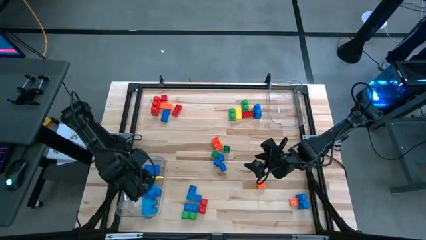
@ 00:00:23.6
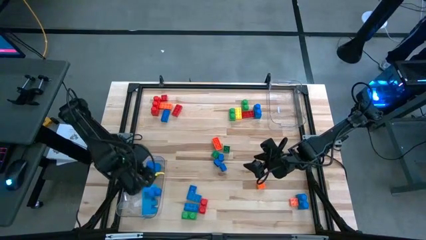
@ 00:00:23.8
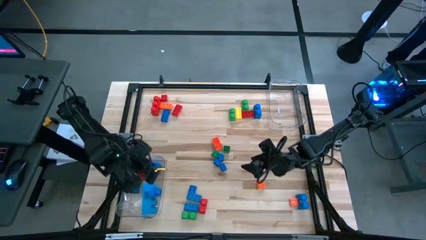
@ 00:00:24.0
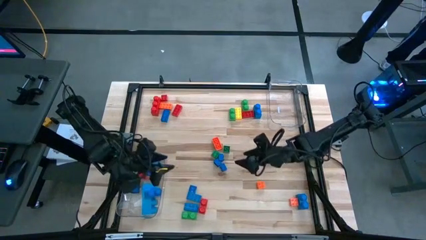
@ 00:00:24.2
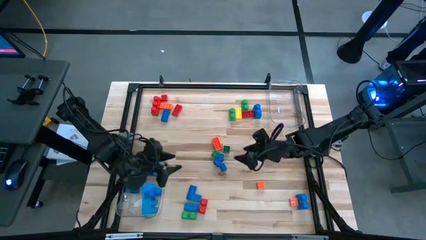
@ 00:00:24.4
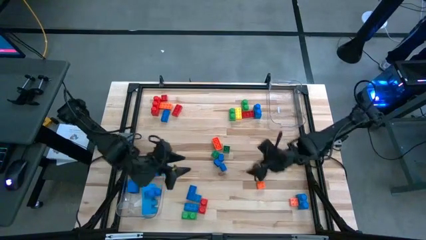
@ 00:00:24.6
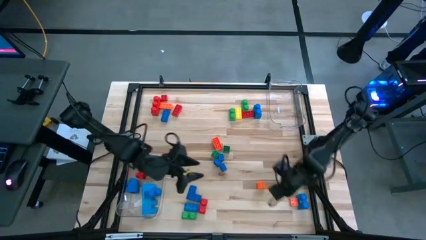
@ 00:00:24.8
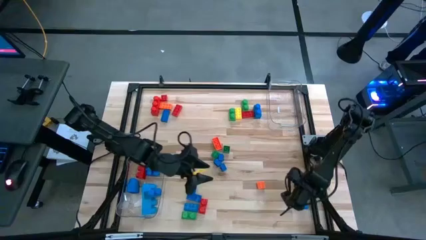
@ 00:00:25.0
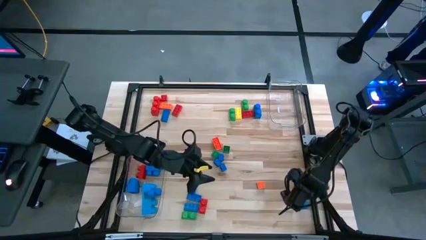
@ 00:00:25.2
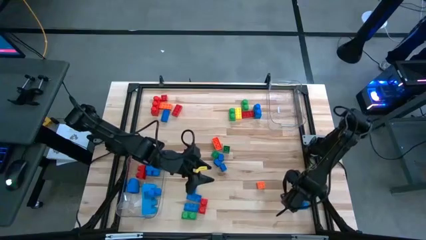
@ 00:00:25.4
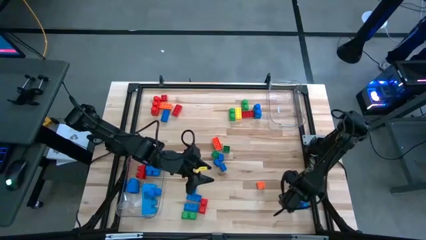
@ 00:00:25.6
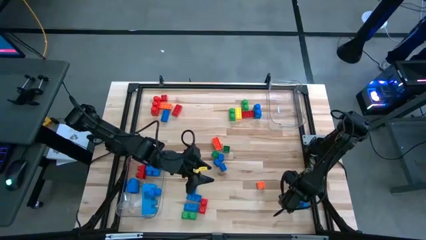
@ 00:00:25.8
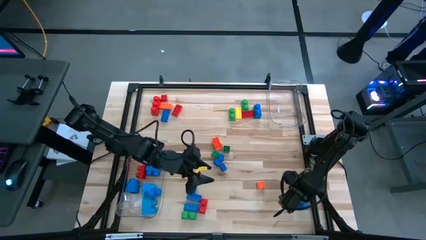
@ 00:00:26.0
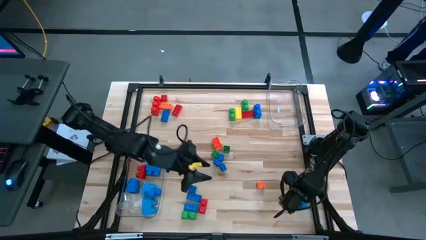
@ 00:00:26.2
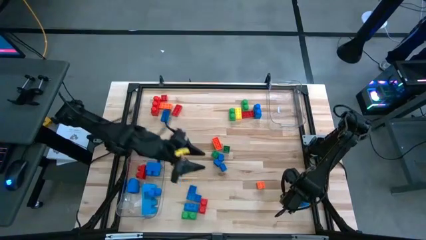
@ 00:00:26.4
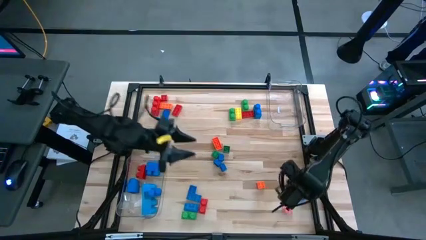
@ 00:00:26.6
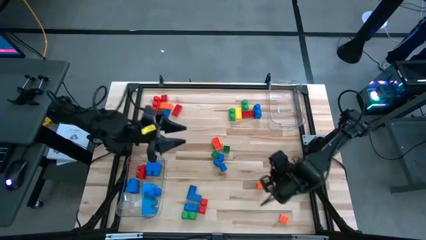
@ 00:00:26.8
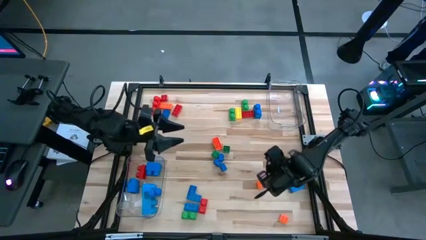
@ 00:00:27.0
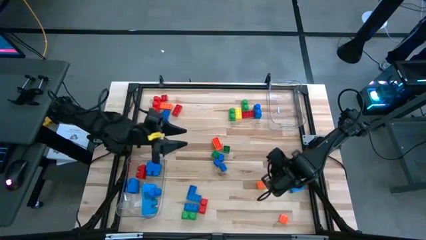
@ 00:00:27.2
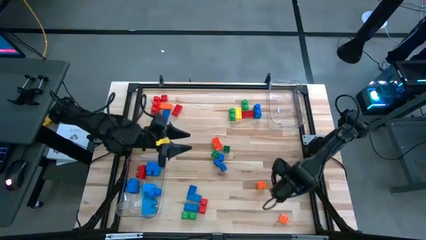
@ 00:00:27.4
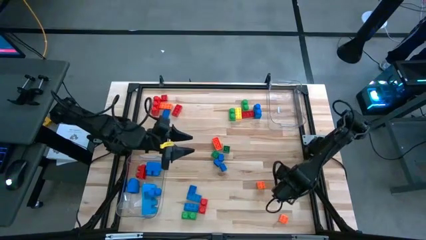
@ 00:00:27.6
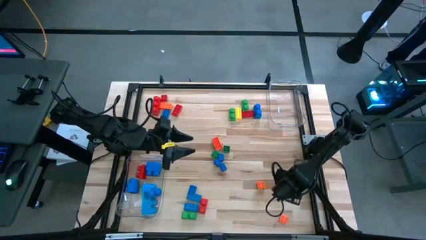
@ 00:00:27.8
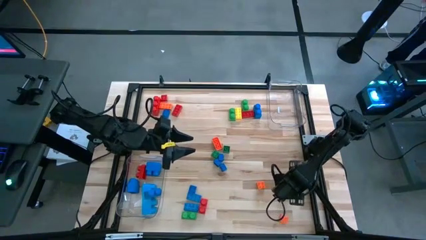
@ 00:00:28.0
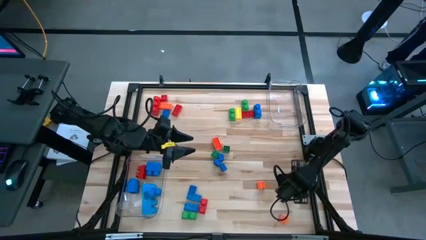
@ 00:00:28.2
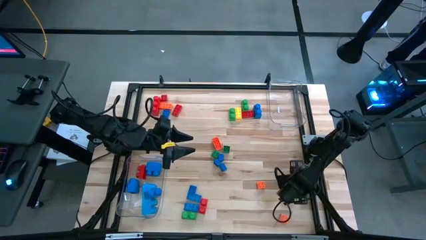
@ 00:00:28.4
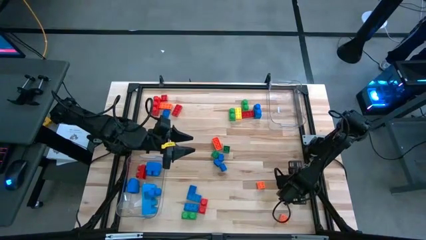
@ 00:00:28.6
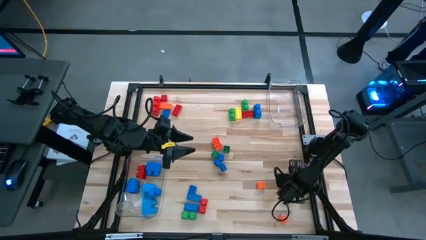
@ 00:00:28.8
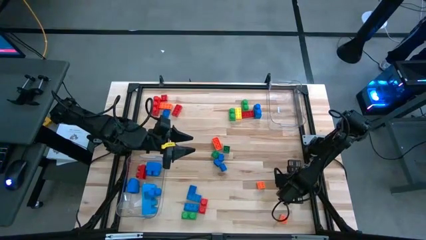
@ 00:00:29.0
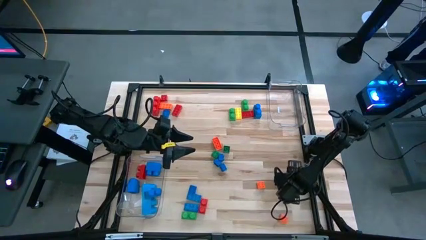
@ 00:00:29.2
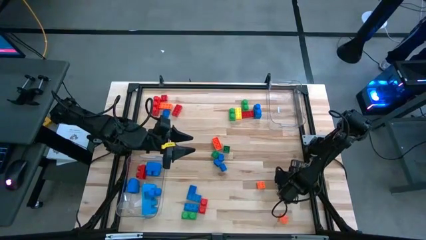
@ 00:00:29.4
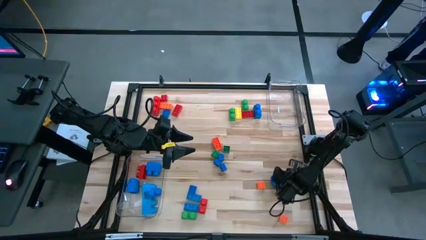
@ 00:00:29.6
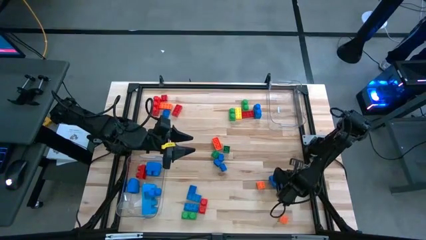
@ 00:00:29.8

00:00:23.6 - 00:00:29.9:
Task: Sort blocks by size
Put the large blue game piece into the bottom transparent bin

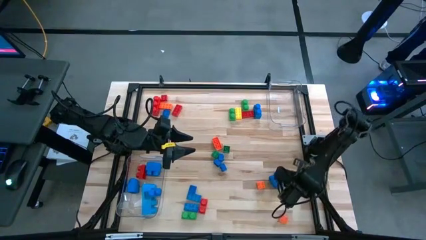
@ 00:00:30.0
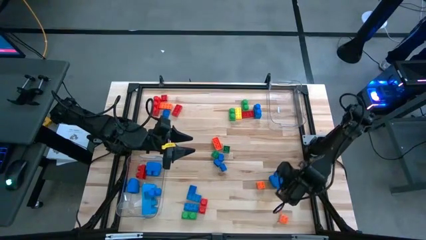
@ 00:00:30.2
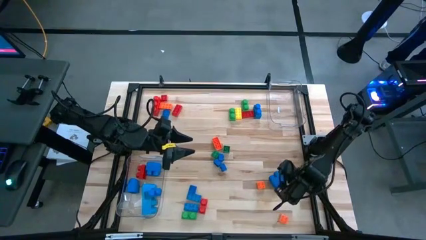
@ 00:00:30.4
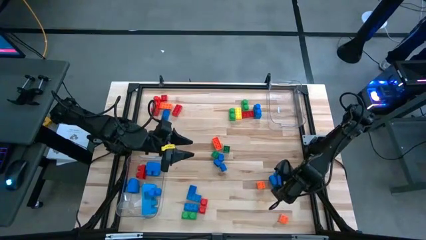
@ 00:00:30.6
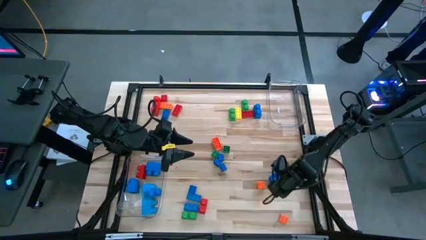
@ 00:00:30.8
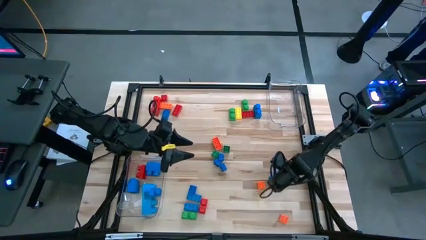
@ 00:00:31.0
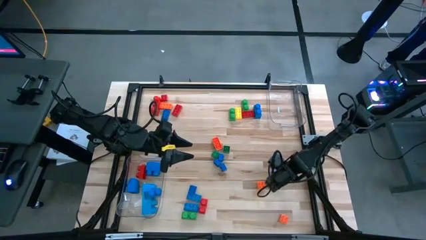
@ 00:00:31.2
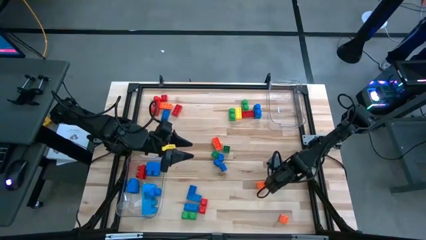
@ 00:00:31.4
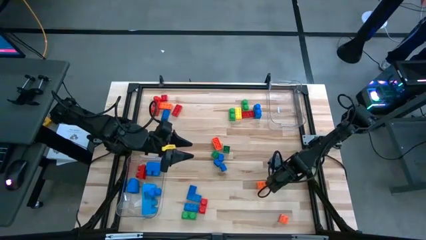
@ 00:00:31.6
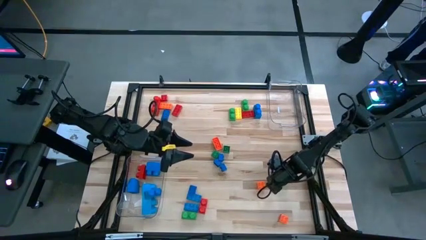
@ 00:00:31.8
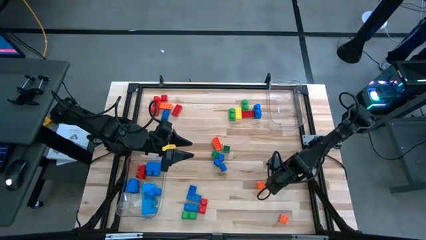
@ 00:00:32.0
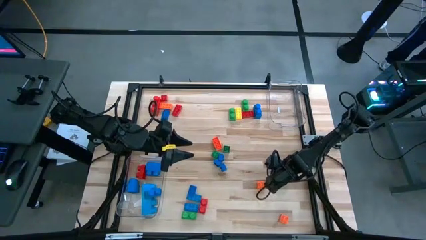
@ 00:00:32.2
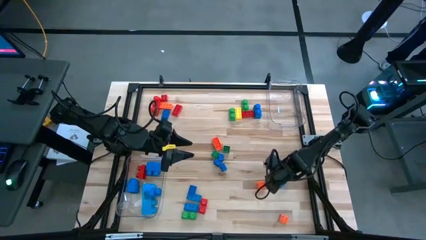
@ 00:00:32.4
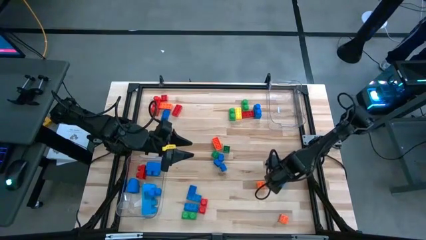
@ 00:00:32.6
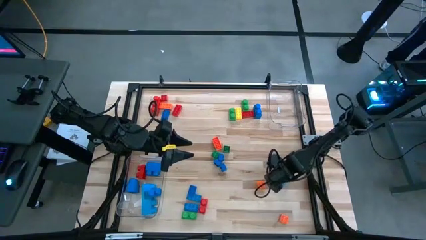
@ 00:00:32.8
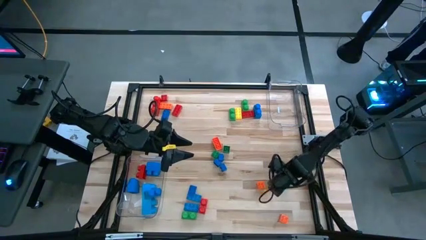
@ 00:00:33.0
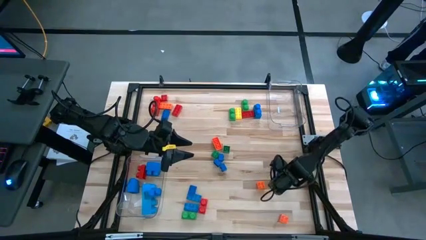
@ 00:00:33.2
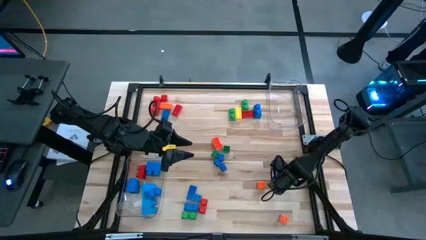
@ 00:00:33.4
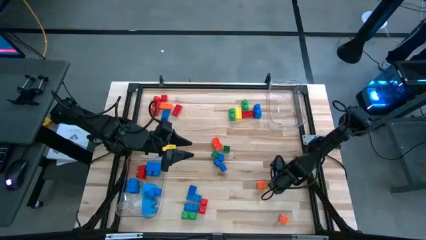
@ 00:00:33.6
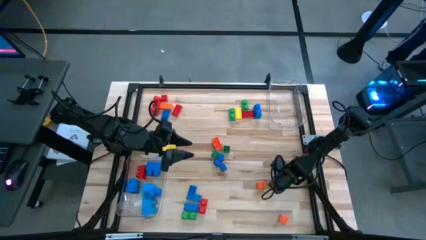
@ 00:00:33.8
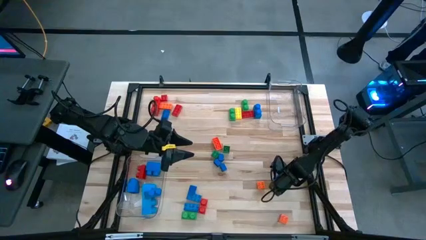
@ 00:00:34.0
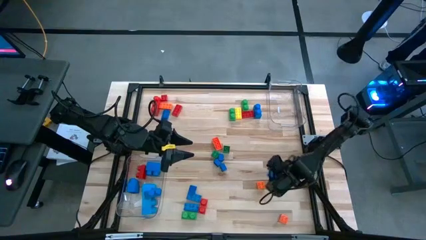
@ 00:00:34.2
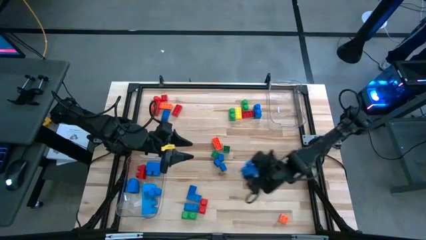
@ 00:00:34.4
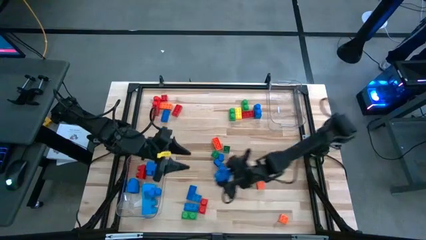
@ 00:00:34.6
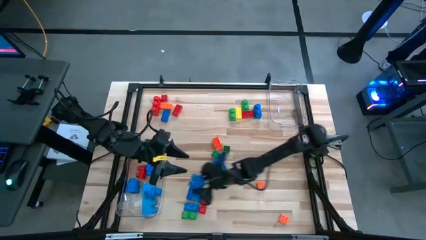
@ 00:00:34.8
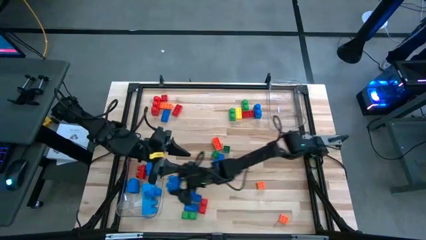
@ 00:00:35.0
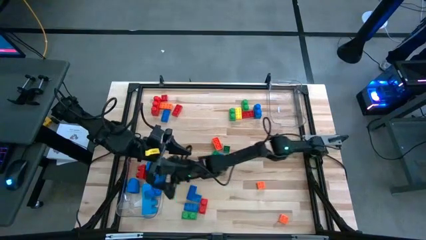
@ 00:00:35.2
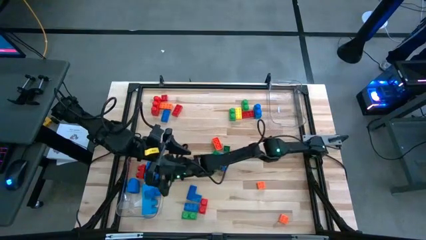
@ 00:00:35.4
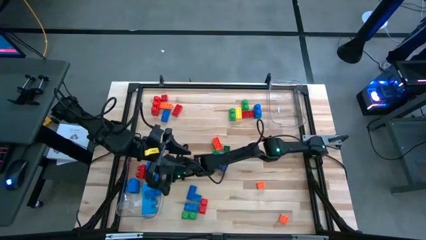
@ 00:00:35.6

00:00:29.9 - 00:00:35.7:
Put the large blue game piece into the bottom transparent bin

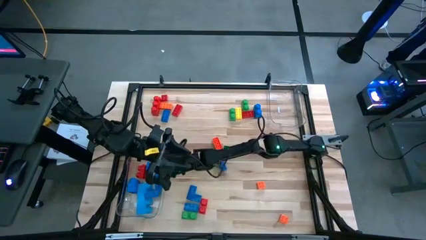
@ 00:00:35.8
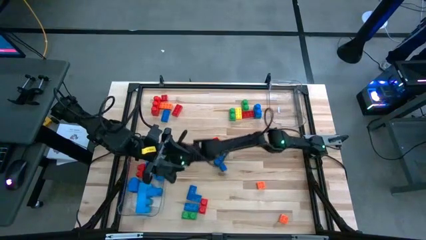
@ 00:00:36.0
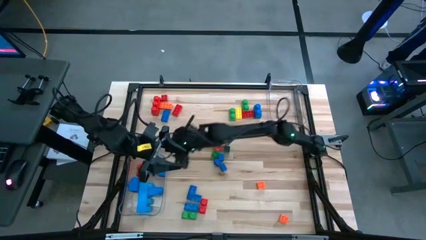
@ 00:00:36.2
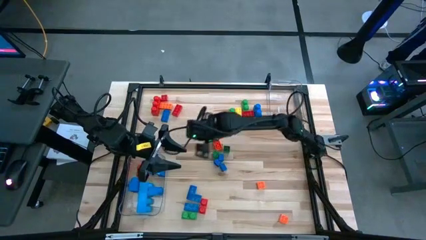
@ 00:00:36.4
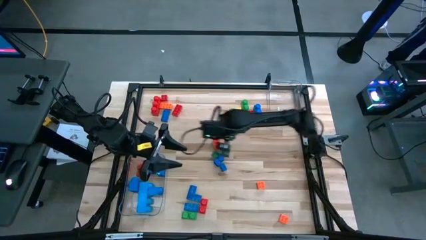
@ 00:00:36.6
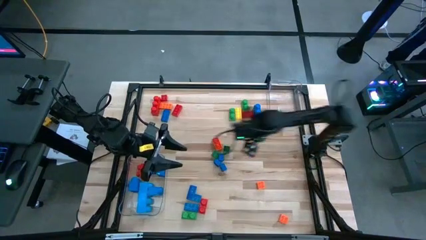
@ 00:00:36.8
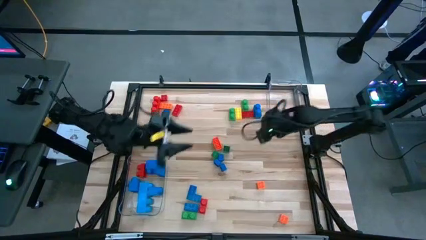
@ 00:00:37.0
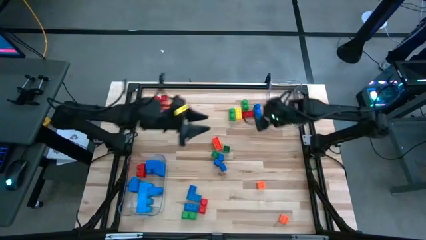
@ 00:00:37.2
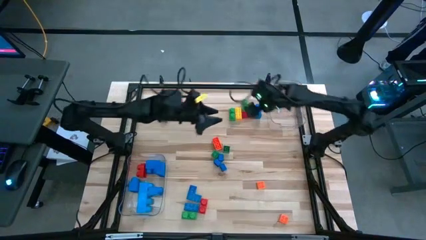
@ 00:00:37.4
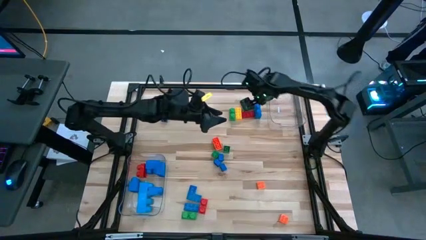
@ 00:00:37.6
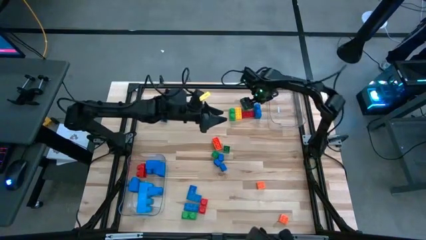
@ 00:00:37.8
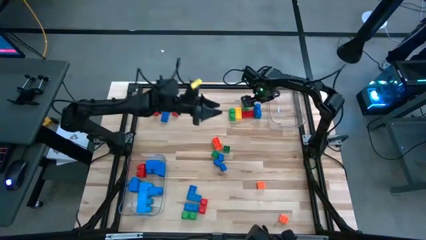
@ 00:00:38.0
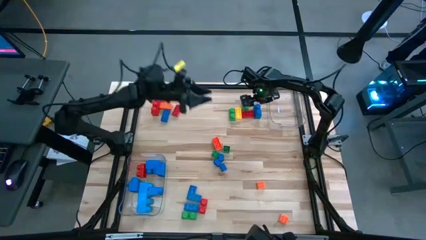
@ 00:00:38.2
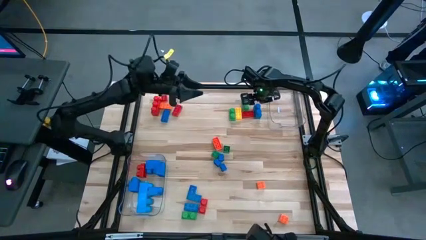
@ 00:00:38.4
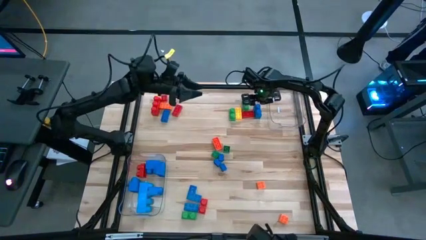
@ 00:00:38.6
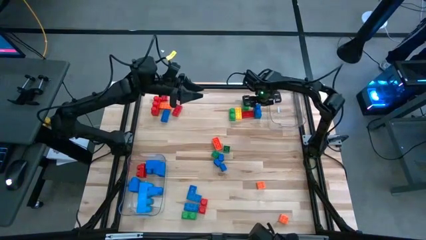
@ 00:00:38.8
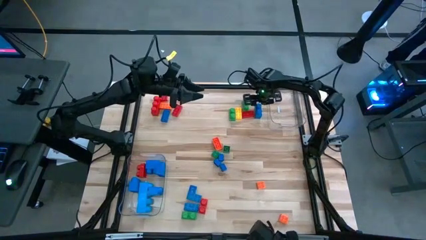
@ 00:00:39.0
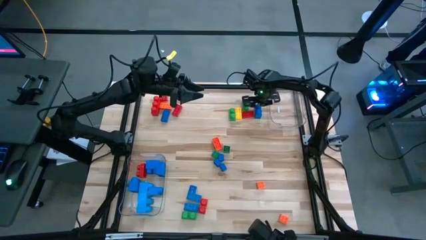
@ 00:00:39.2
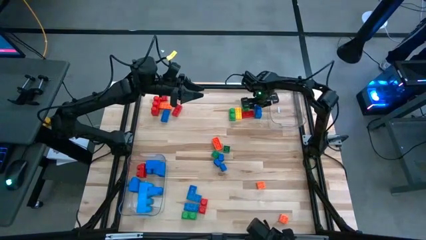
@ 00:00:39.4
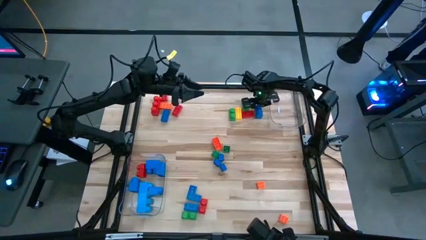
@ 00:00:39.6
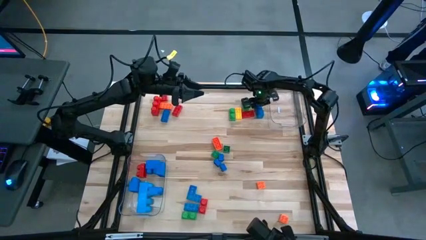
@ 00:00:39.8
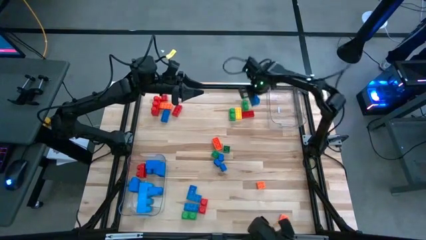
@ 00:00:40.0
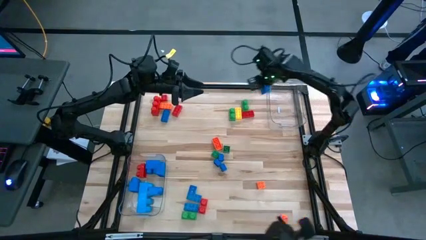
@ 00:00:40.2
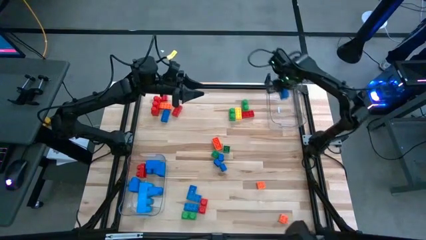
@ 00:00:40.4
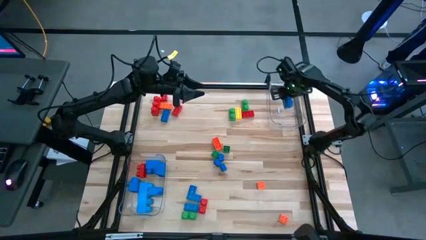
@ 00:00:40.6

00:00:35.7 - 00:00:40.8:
Put the large blue game piece into the bottom transparent bin
